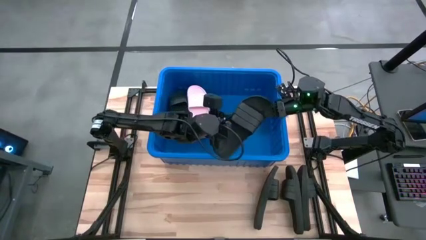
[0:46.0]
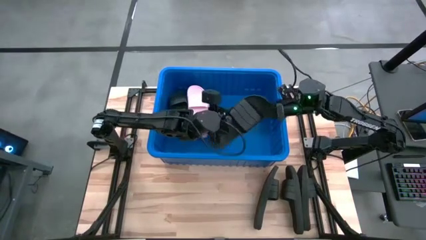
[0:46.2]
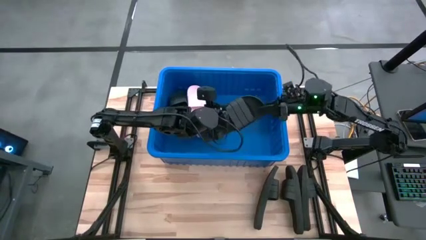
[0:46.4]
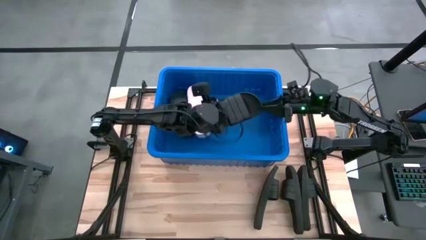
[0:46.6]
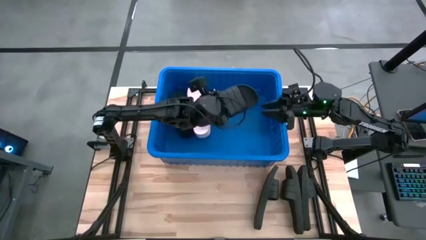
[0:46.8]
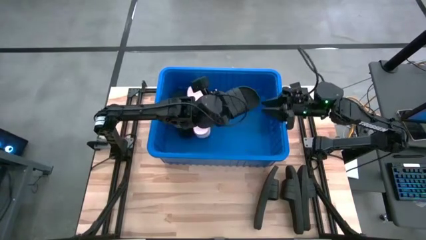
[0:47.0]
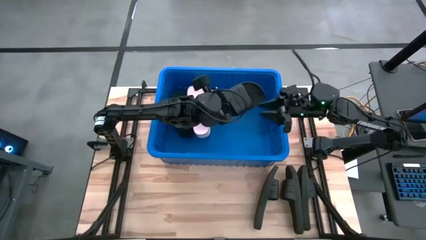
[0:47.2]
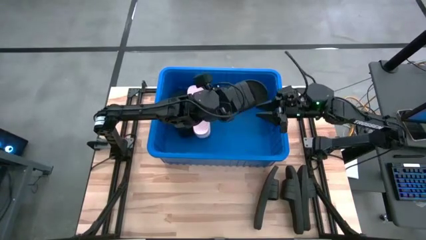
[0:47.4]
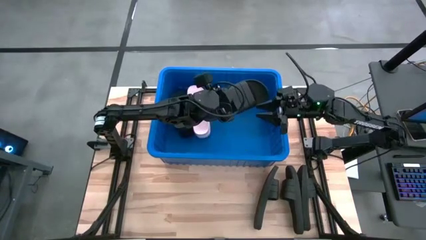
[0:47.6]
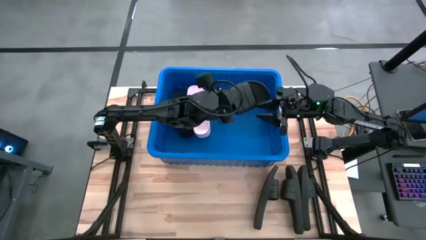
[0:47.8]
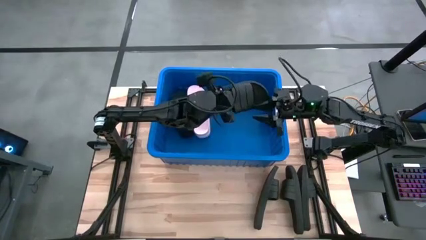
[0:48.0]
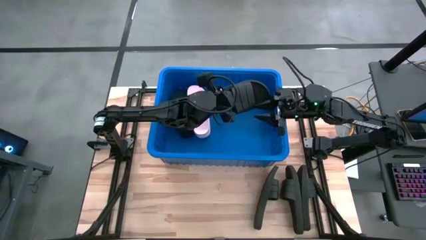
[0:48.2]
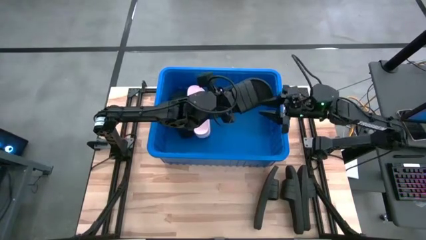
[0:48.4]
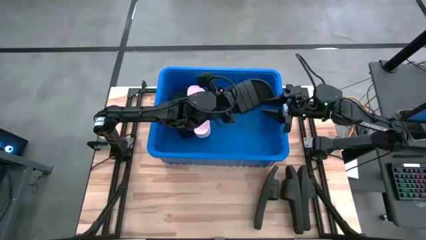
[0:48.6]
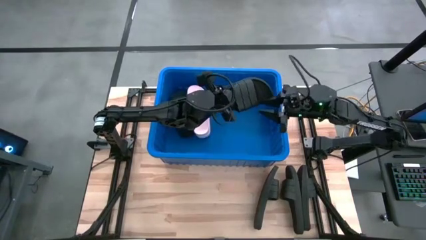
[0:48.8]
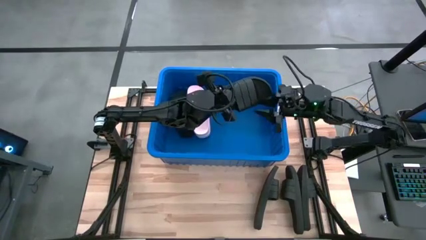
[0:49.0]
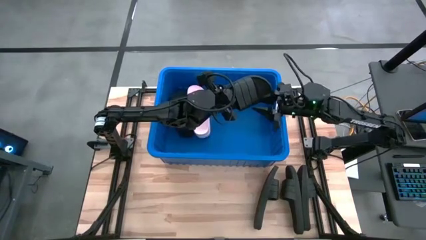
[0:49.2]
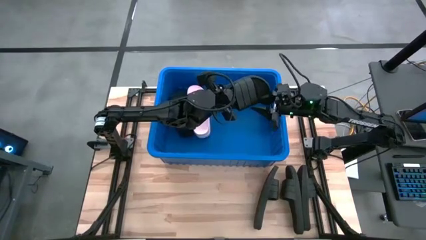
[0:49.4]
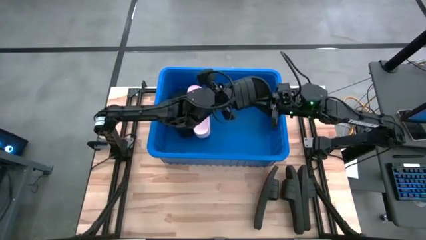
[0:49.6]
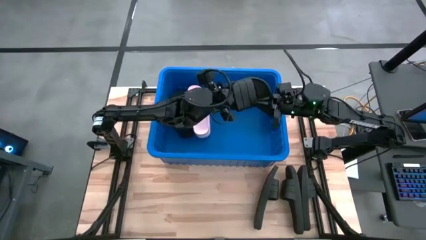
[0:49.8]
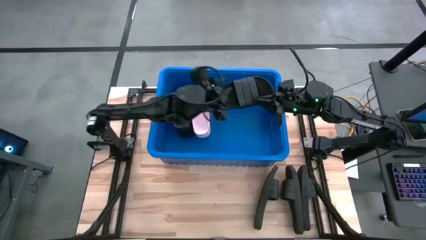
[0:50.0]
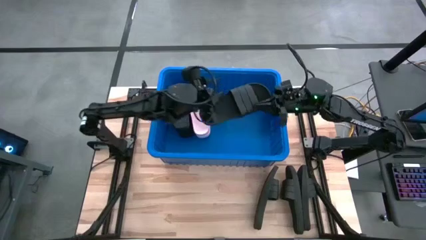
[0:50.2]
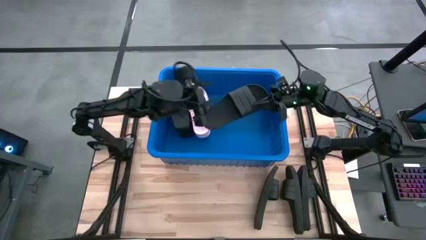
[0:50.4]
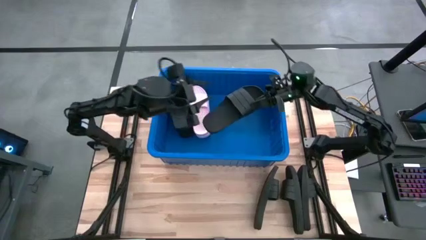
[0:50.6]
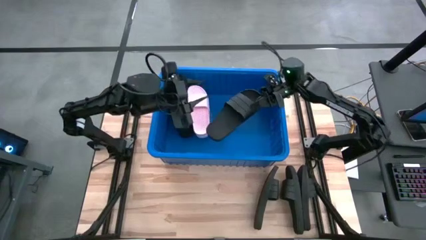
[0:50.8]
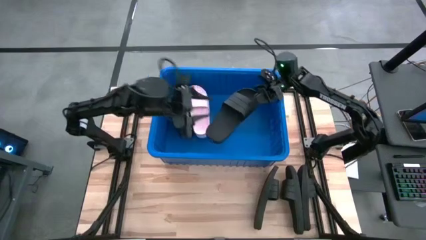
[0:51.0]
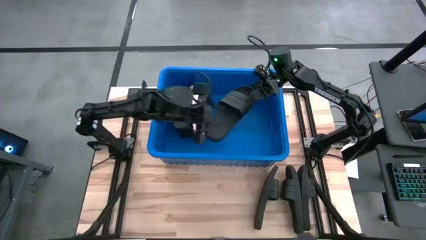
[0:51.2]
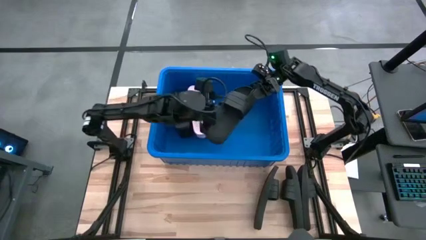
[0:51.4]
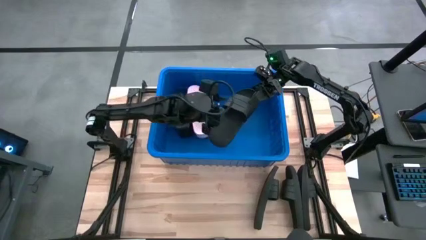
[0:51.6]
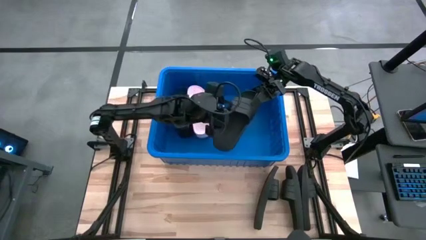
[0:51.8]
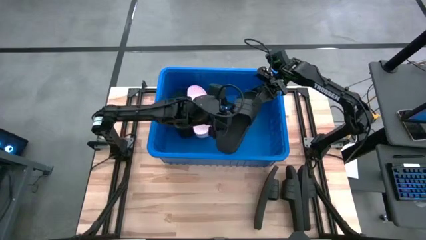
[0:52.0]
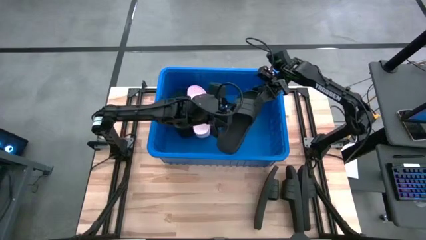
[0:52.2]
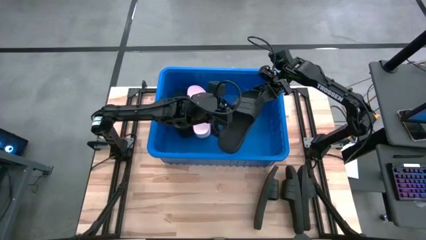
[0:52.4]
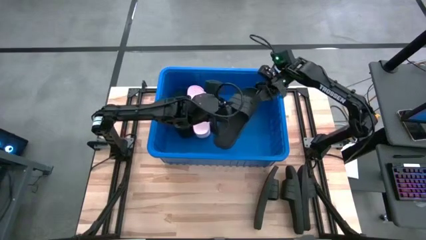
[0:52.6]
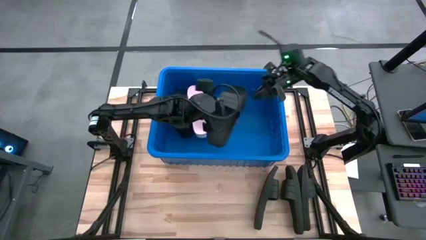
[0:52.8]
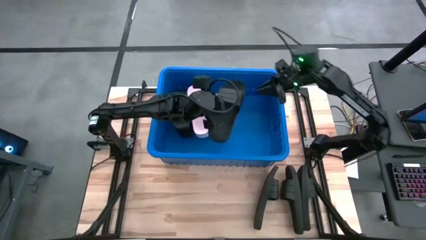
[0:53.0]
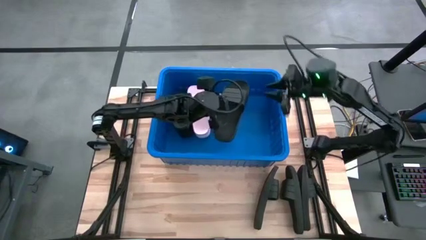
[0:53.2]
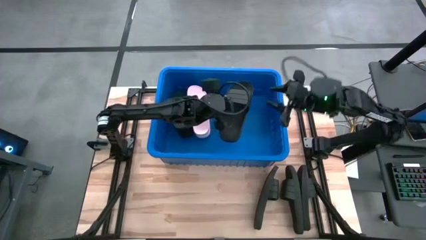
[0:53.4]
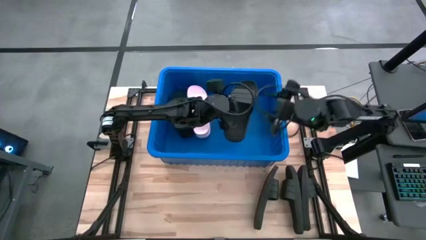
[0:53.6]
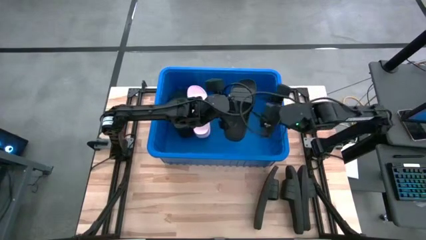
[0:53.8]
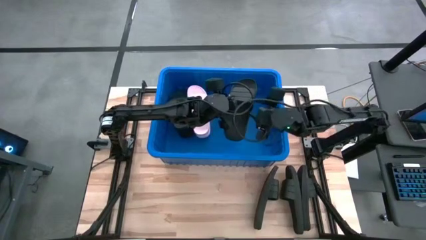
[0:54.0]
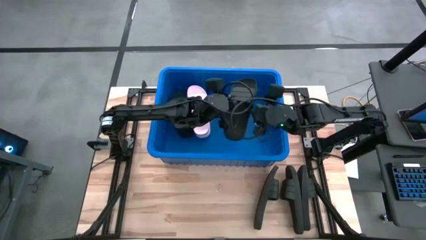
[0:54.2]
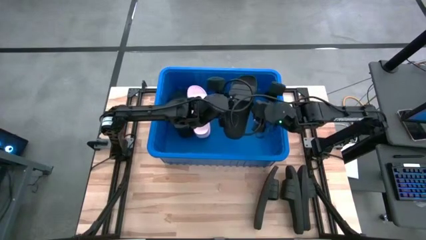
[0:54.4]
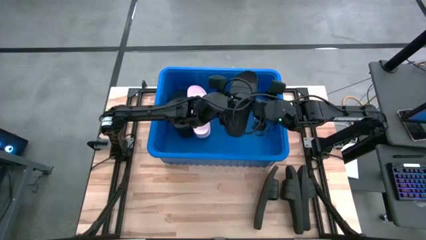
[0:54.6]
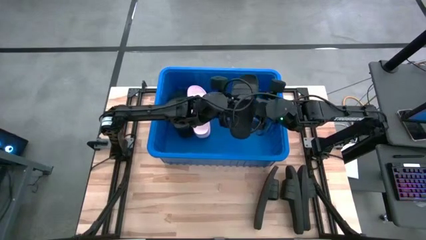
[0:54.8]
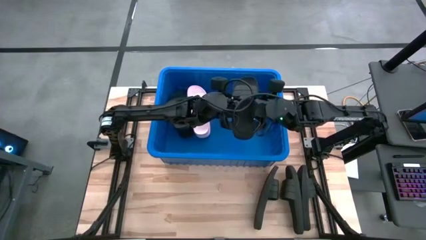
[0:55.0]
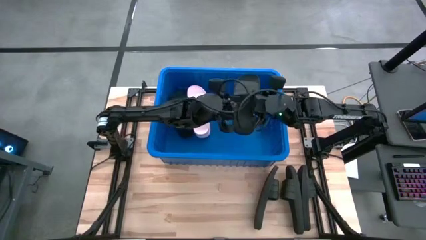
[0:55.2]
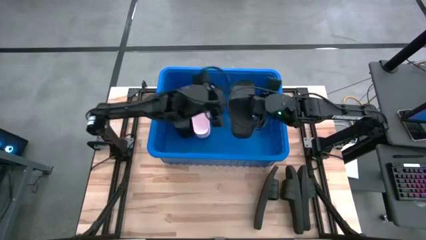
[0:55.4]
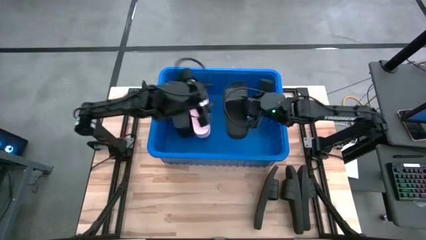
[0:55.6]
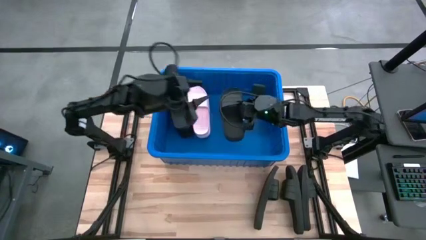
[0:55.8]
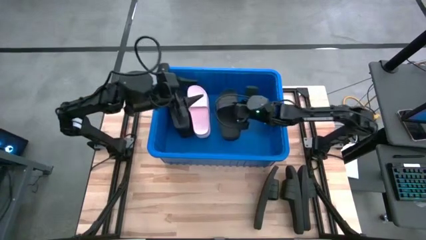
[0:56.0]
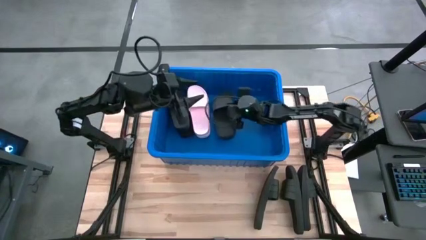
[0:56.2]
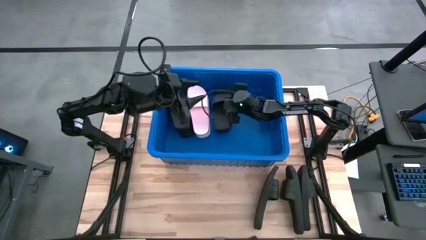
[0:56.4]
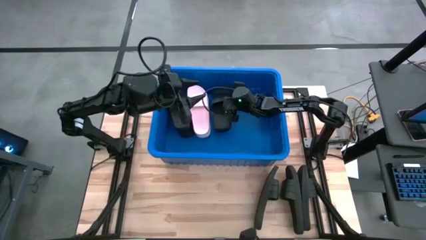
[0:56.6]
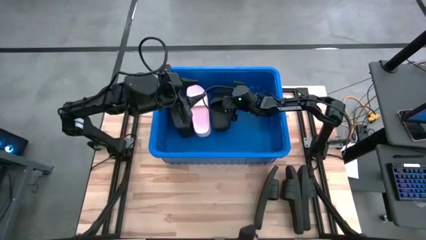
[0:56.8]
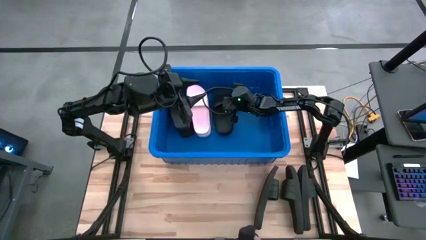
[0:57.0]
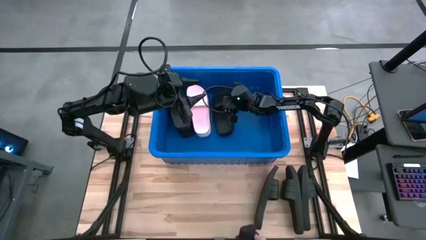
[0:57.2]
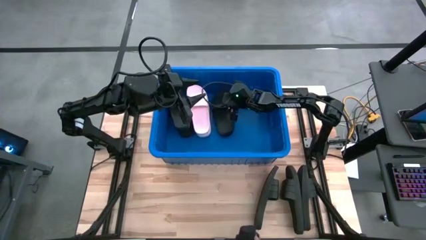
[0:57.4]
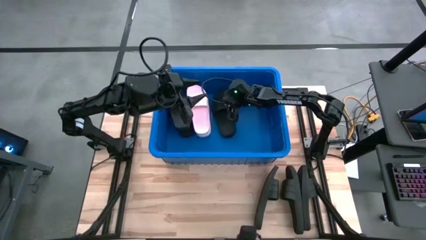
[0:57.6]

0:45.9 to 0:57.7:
Task: Pick and place slides into bin
Put the black slide into the bin

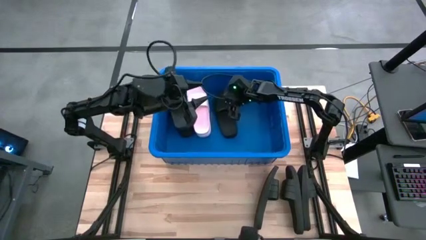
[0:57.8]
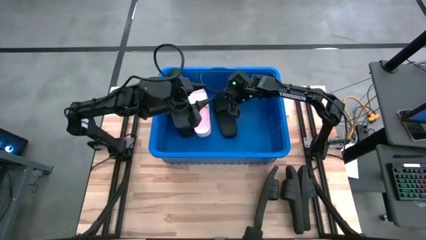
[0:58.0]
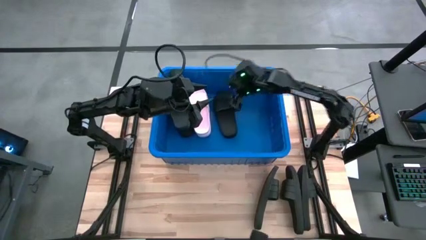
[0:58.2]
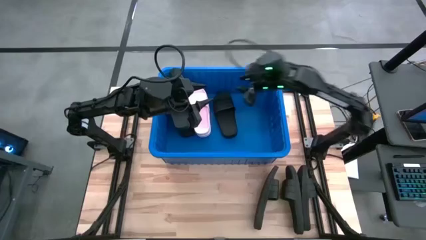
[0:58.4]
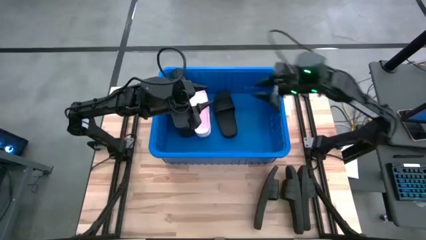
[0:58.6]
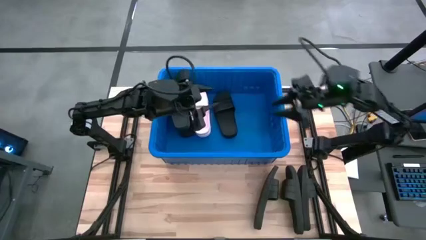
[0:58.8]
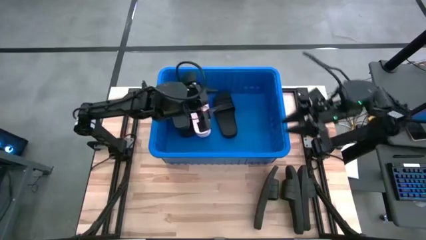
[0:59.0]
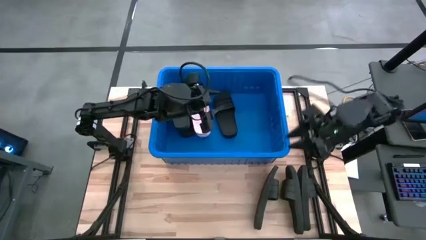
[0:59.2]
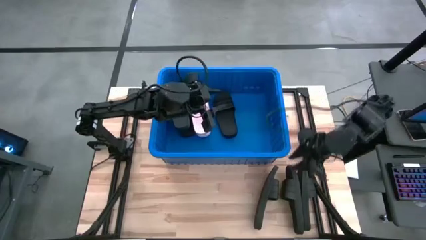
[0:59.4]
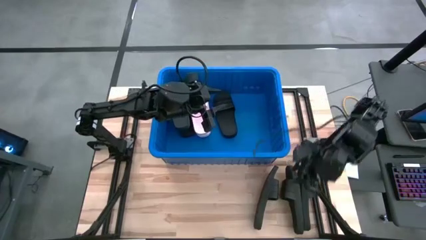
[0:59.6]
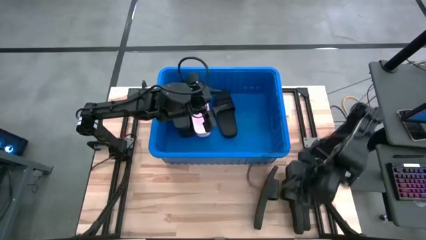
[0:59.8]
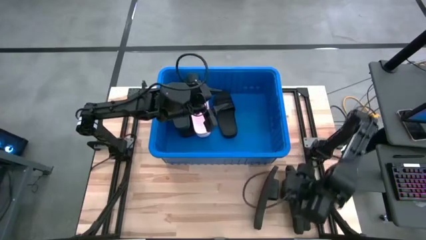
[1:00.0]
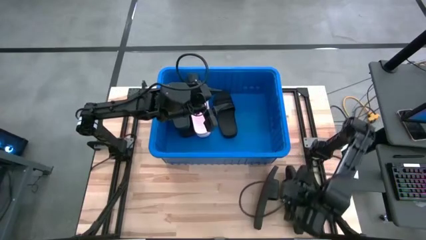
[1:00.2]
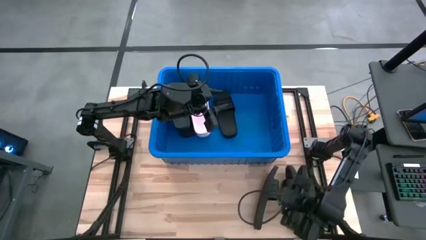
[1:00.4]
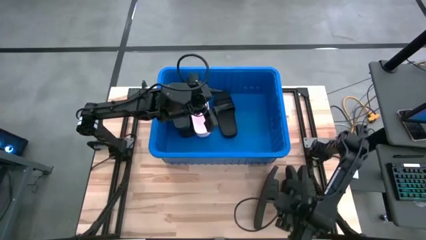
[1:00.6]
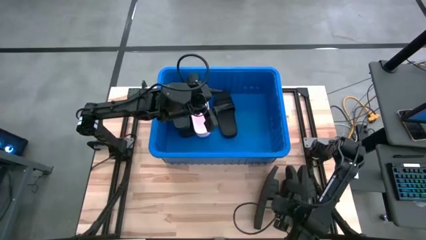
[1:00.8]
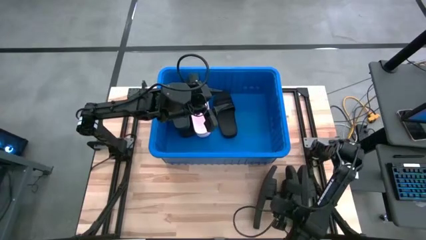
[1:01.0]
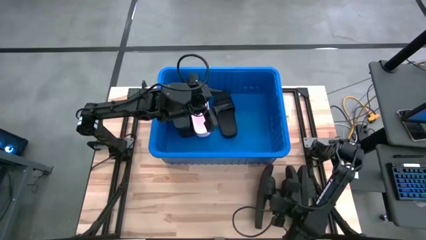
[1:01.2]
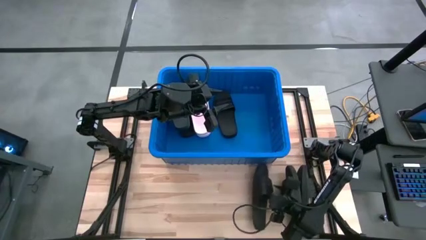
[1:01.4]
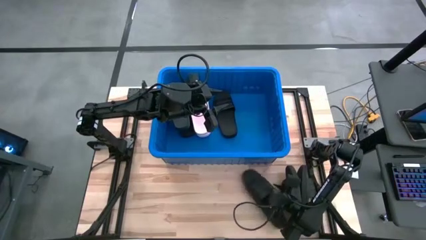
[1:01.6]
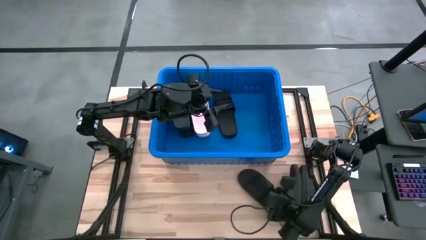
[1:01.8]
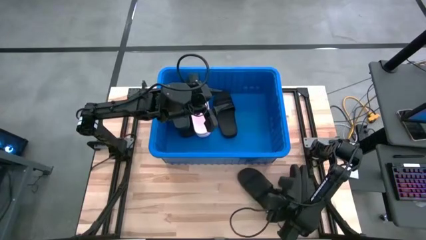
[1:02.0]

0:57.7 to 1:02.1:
Put the left black slide into the bin
